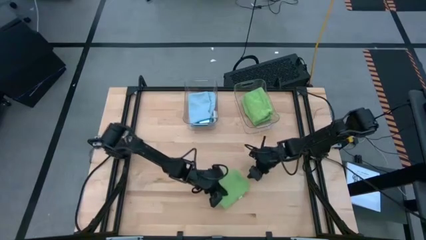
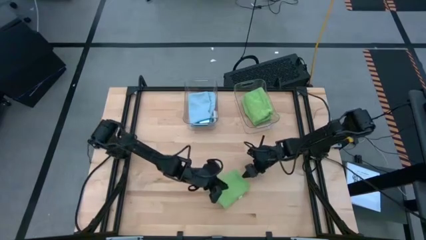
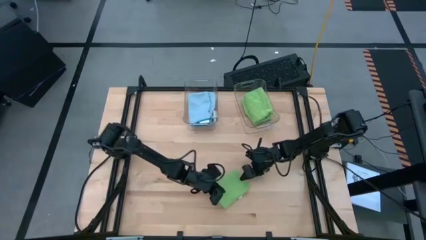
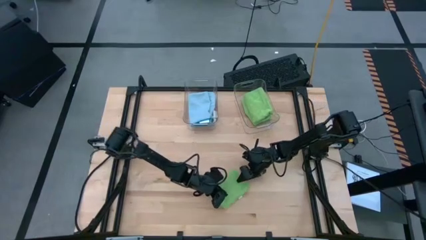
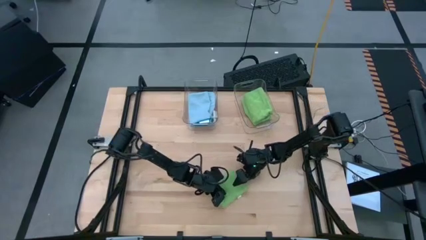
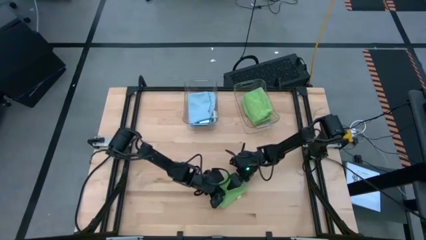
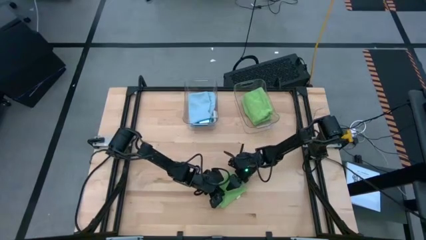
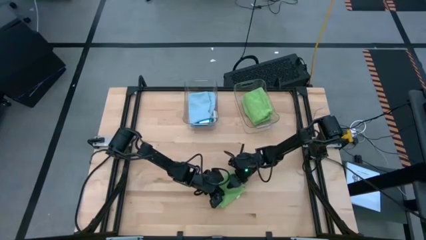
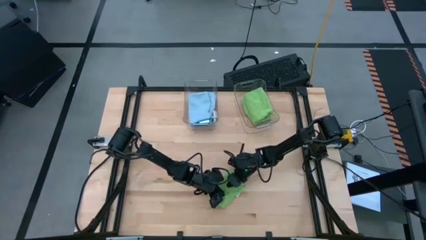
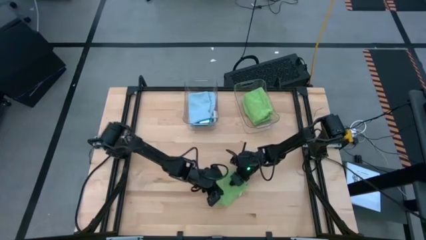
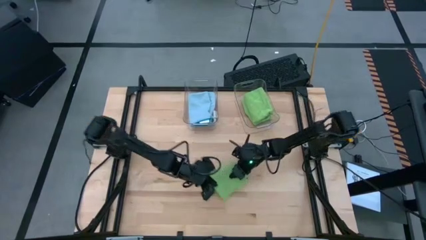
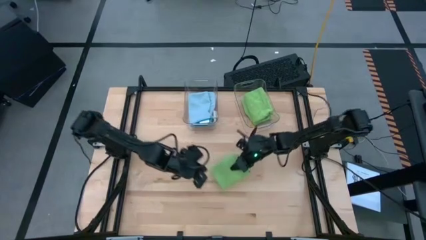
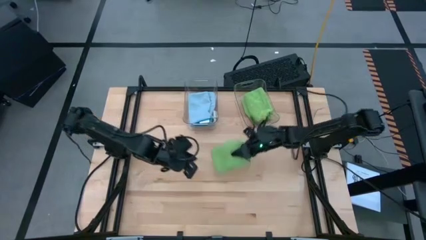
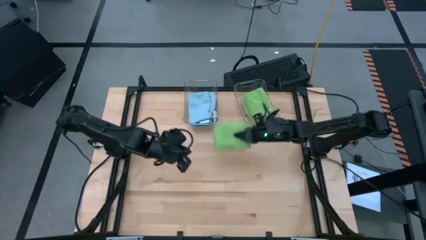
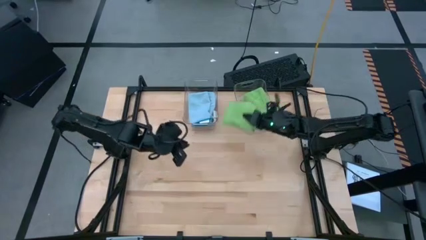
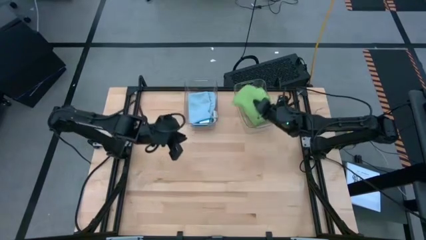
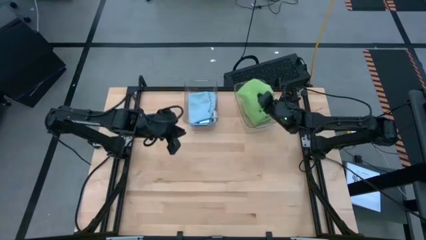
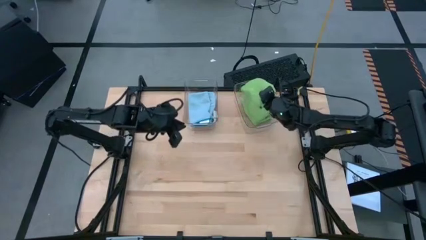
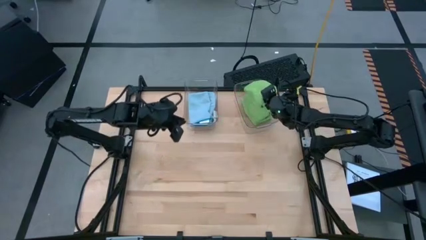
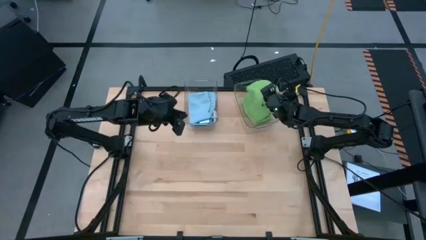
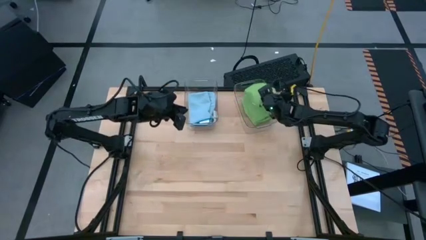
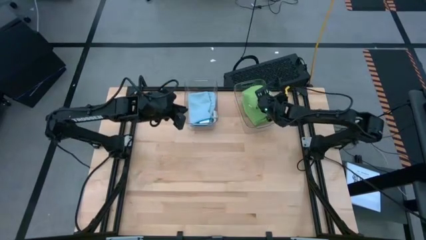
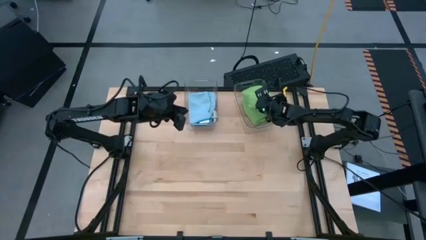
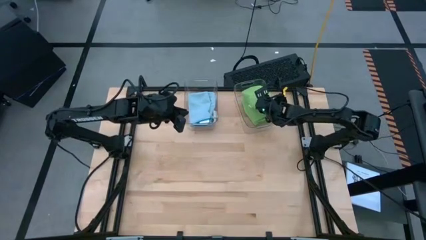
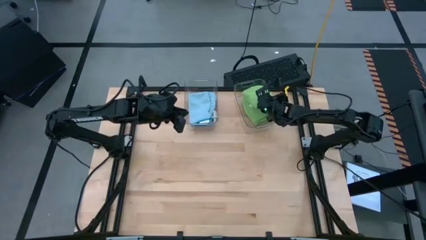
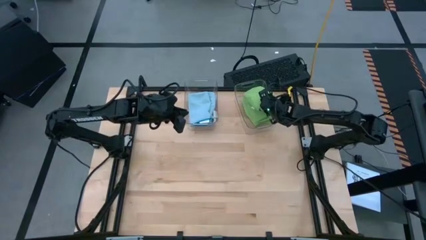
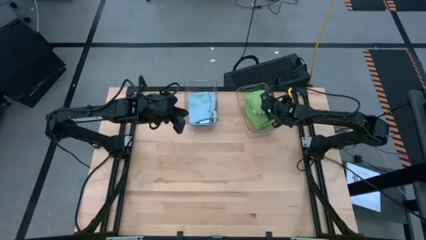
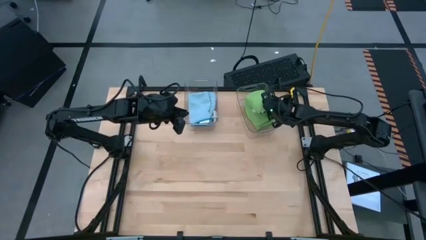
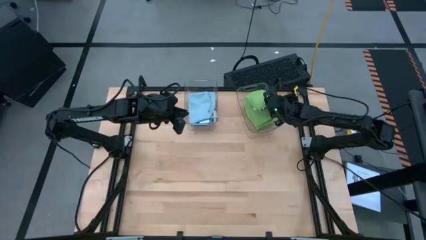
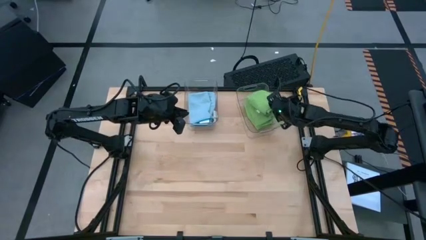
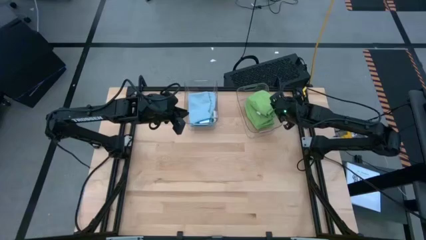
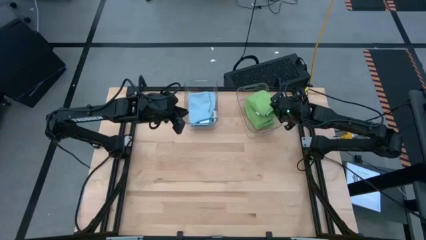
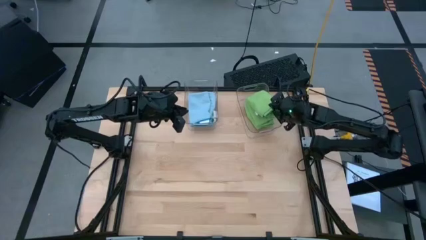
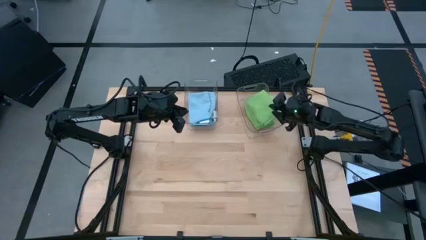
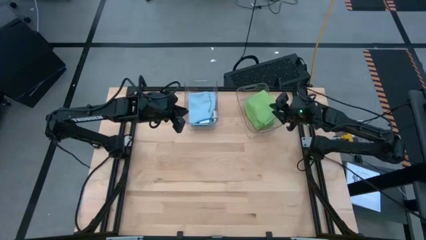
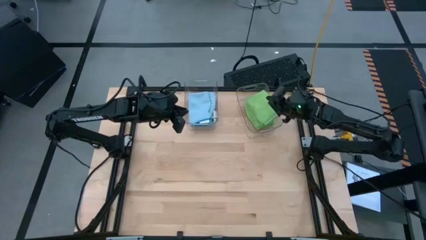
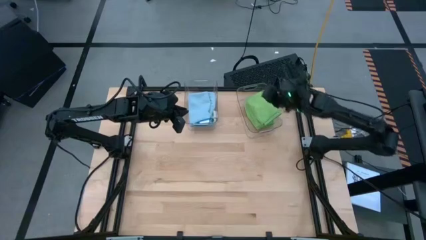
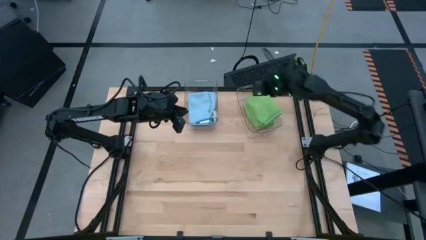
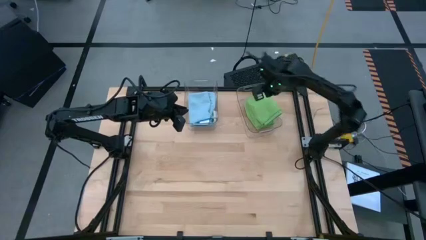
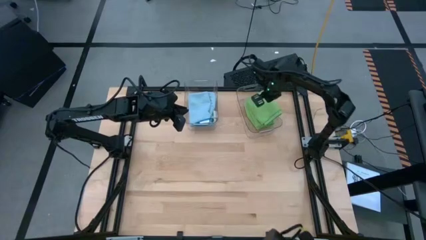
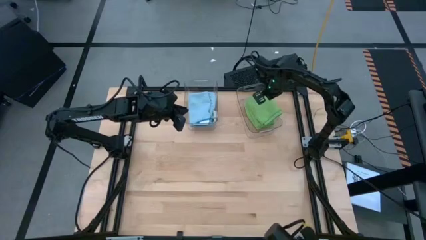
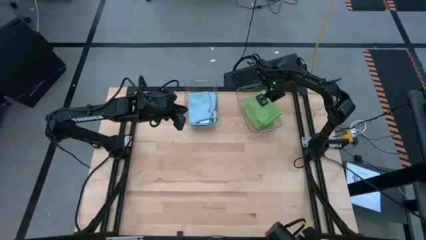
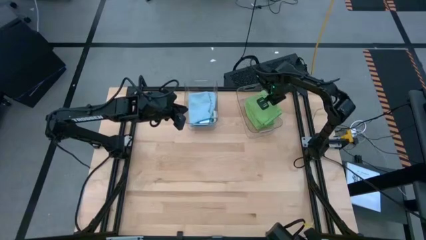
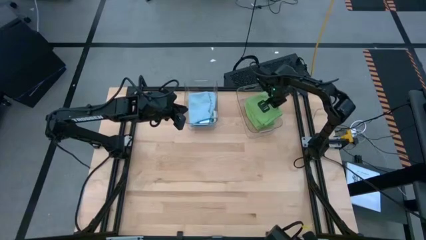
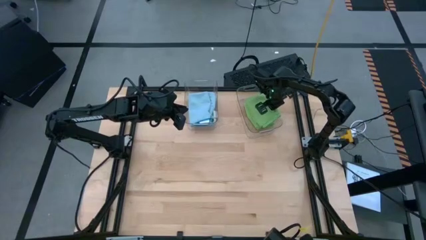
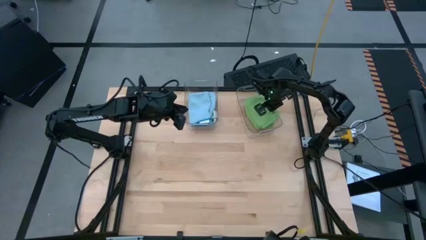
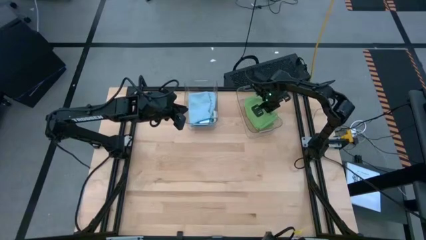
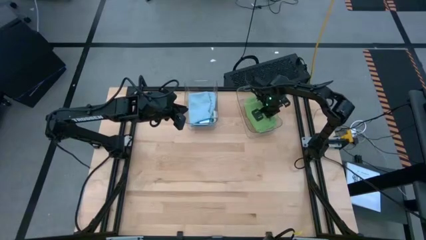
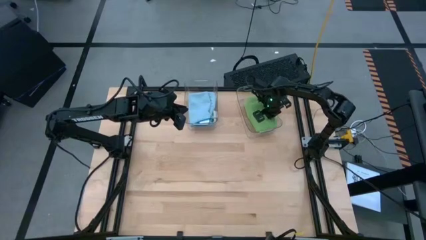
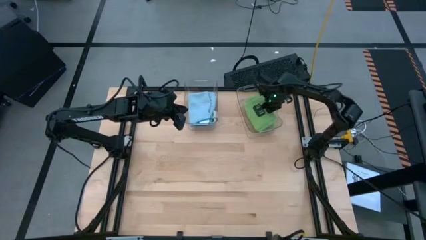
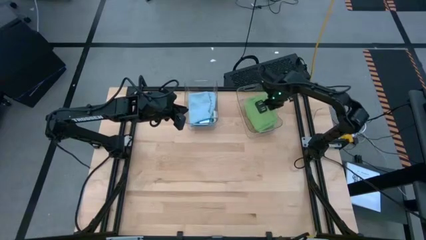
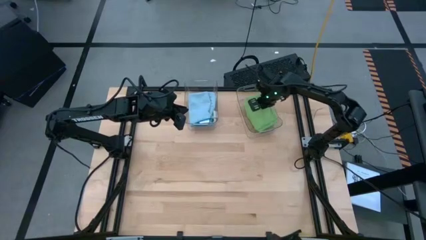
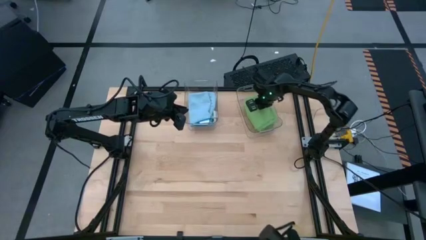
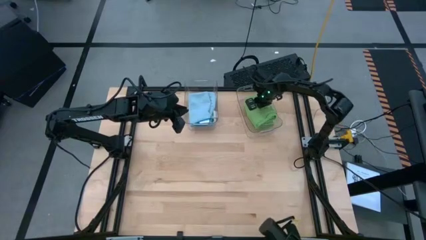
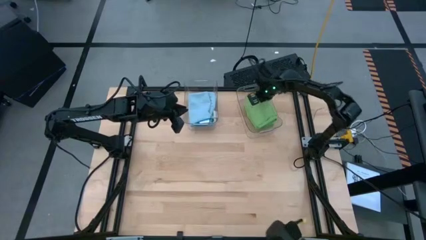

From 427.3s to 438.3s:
Task: Fold microfiber towels
Stack the folded green microfiber towel on top of the other green microfiber towel in the right transparent bin
